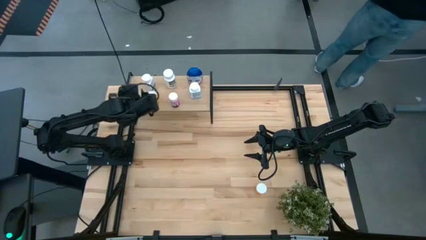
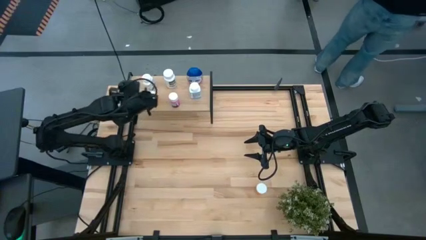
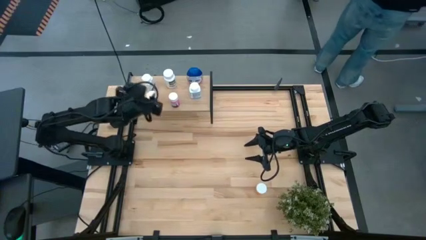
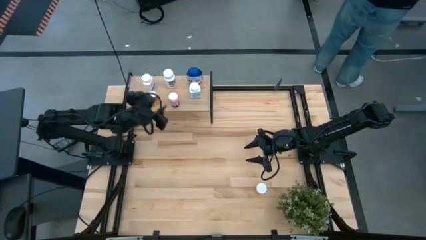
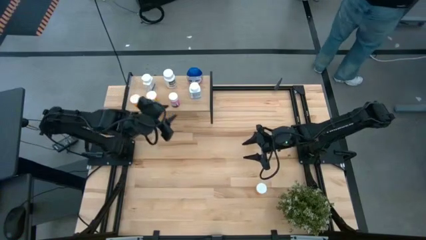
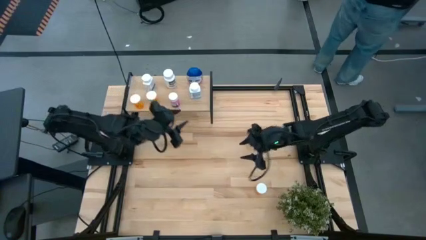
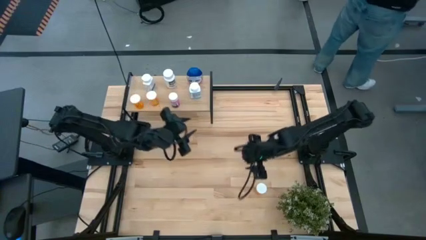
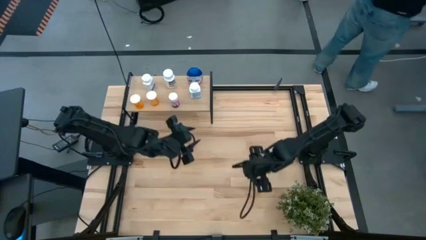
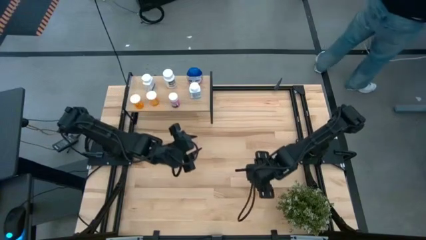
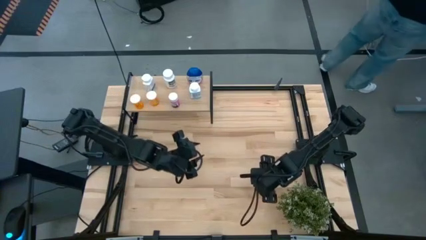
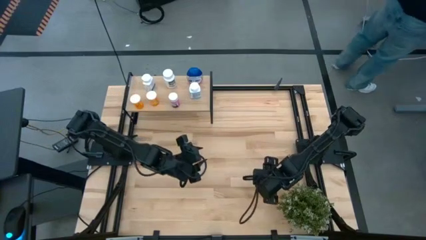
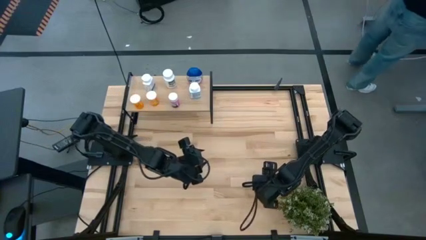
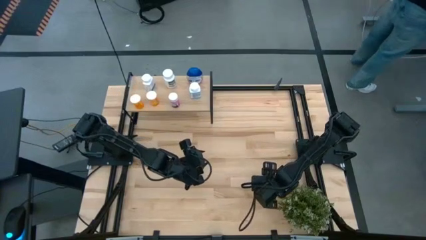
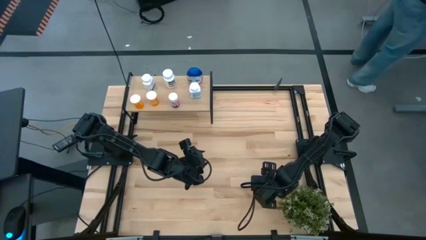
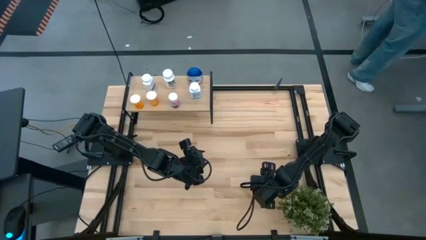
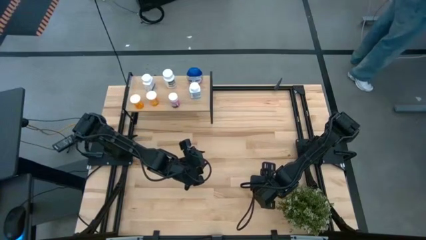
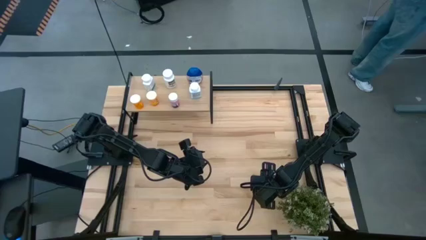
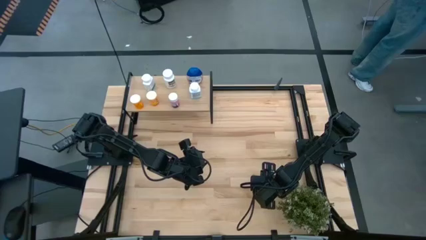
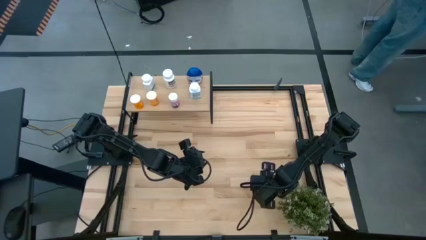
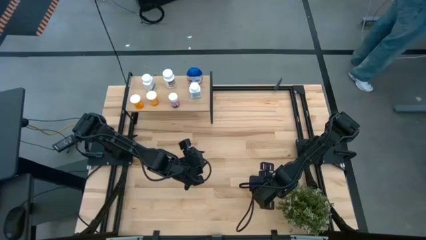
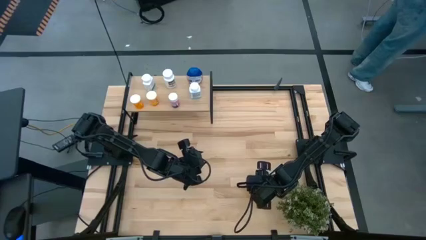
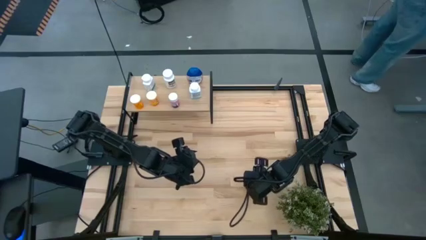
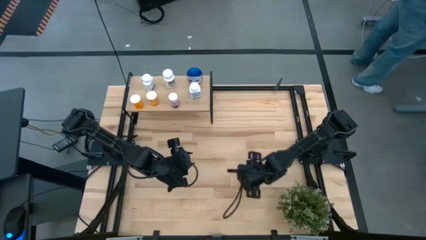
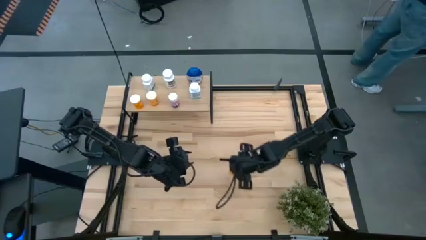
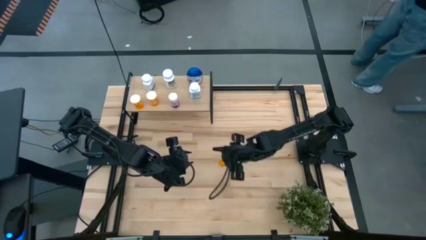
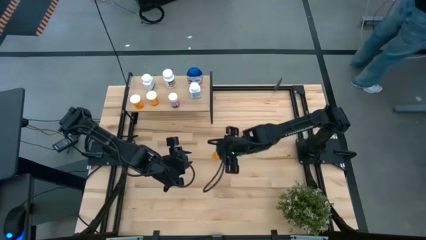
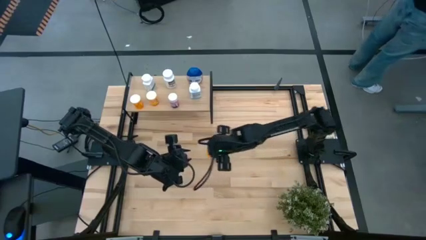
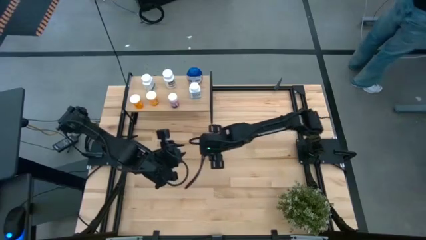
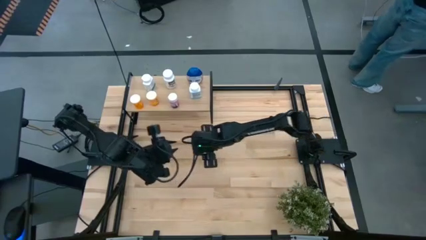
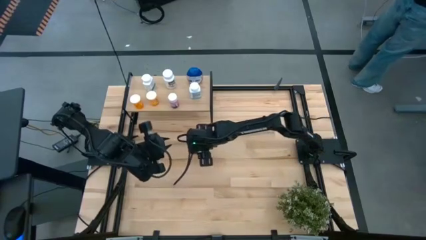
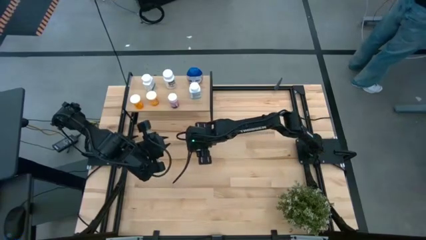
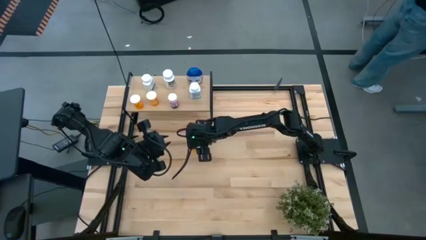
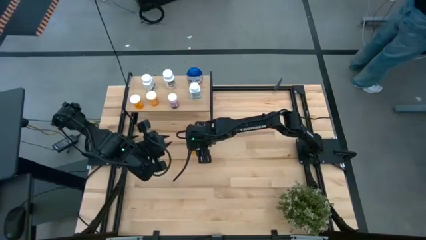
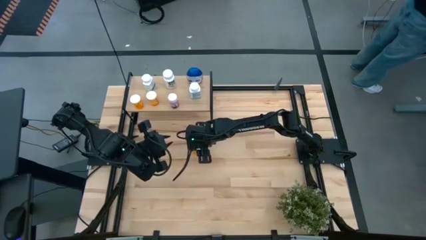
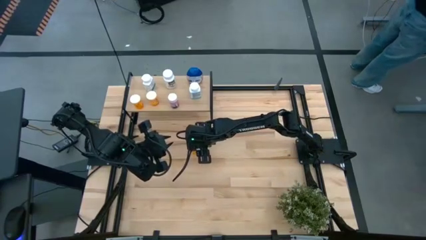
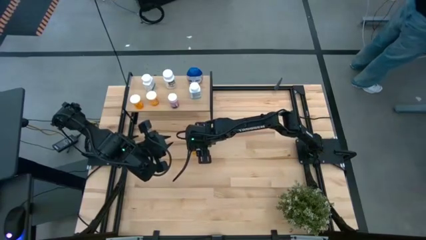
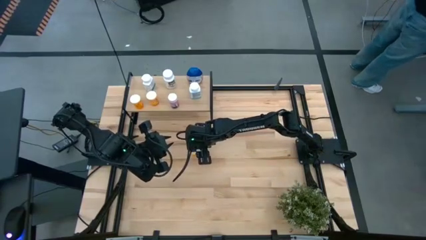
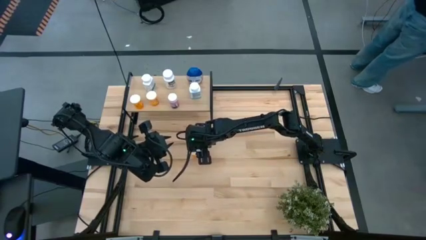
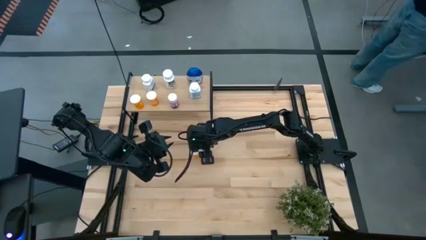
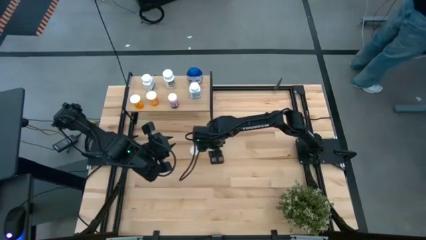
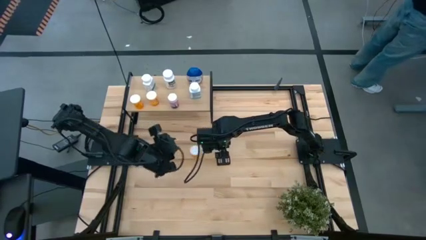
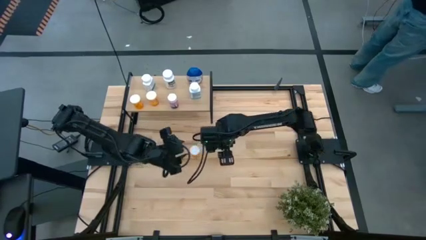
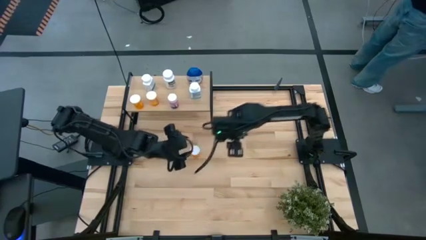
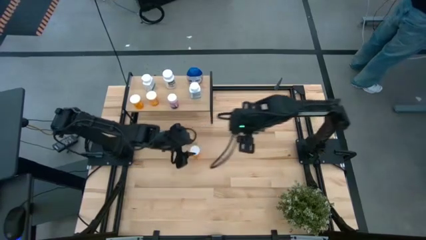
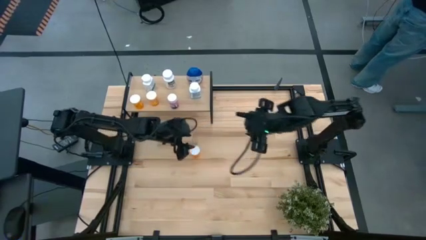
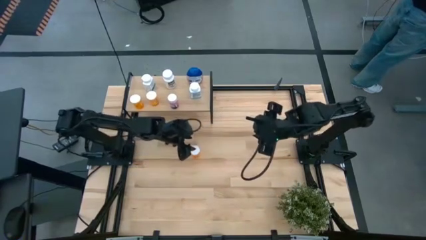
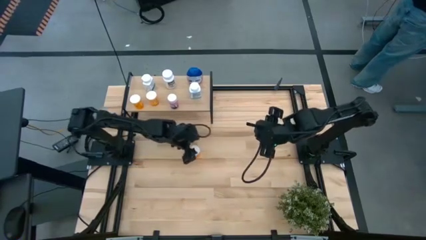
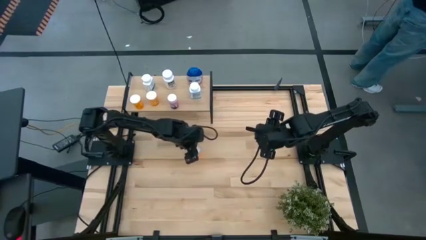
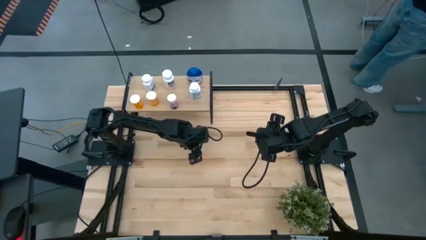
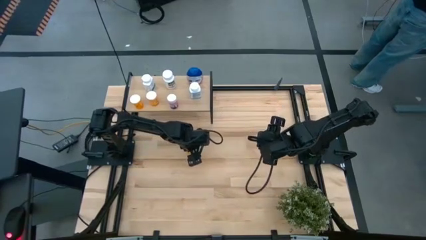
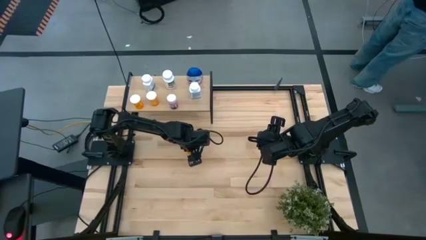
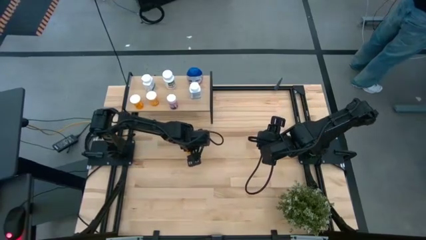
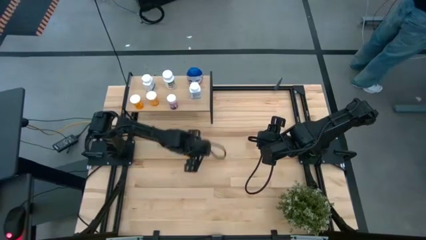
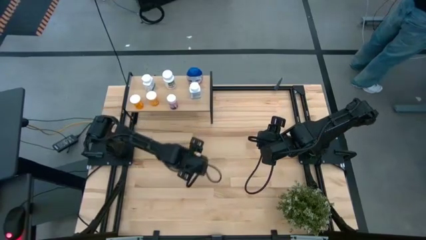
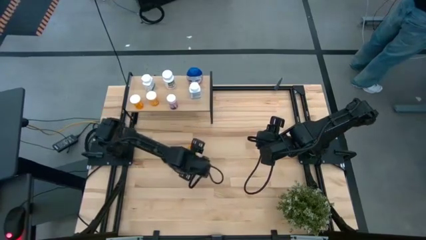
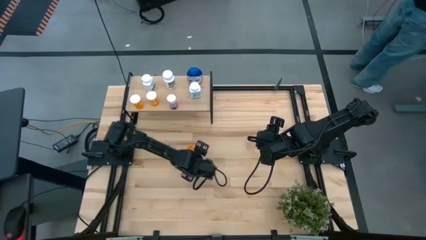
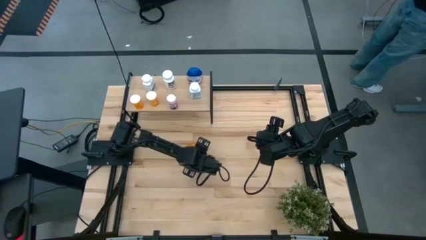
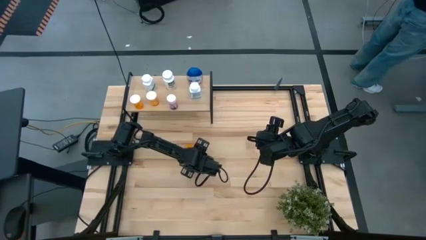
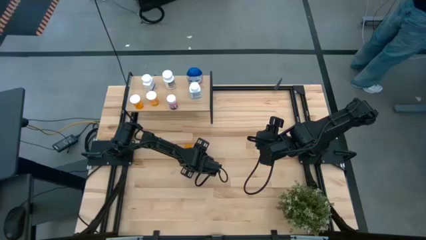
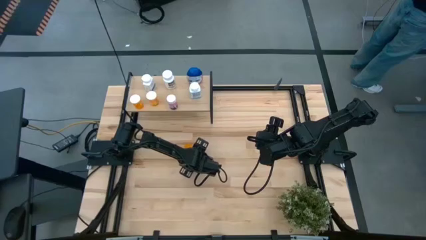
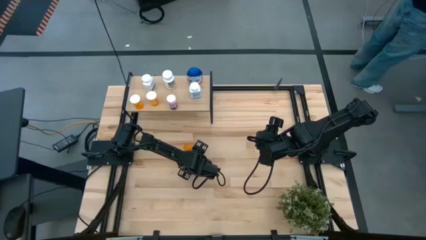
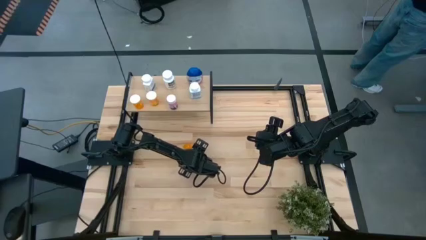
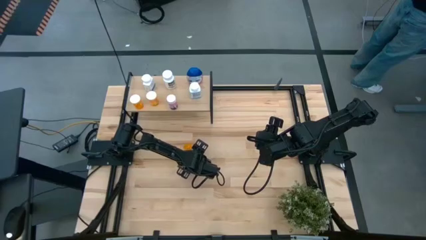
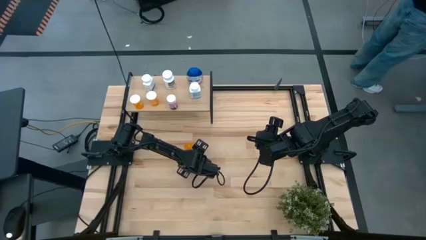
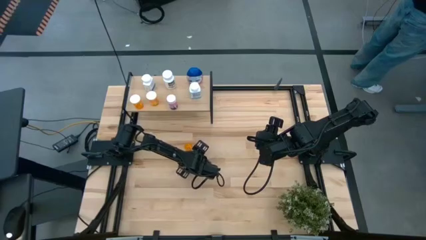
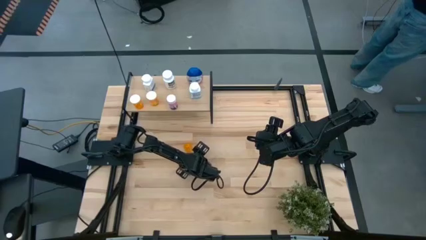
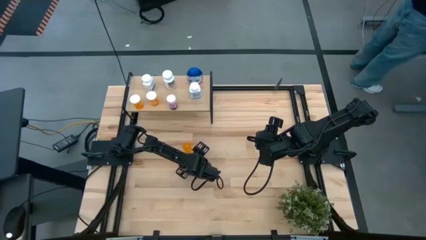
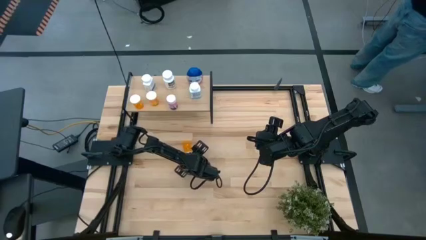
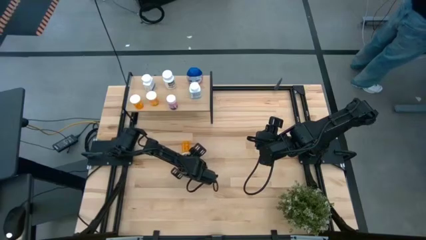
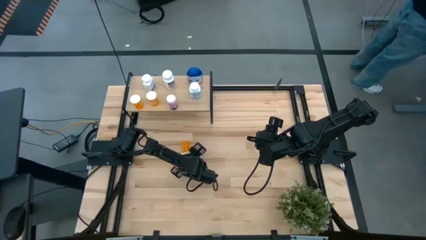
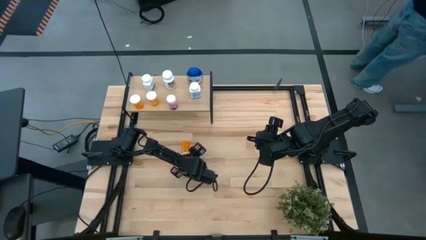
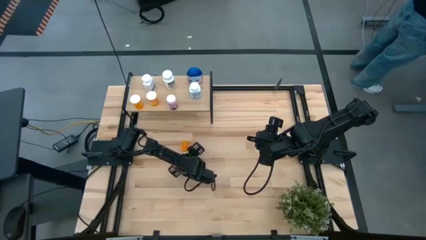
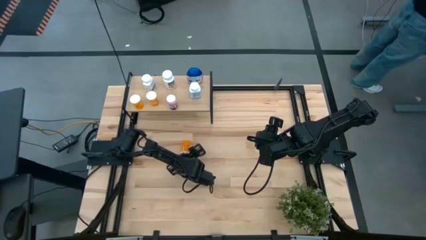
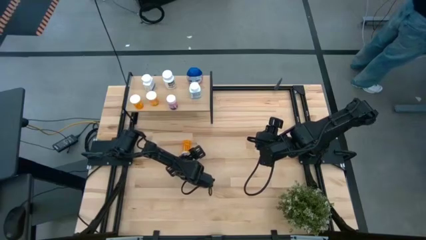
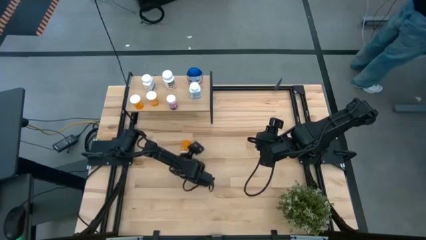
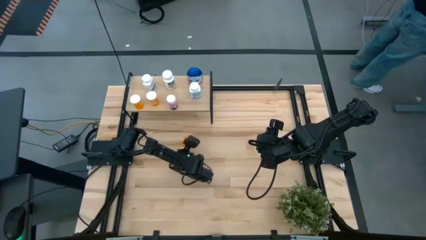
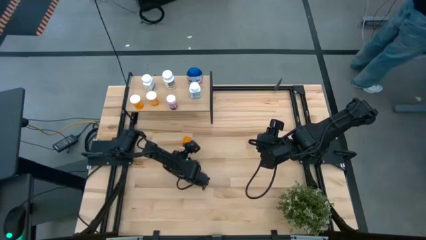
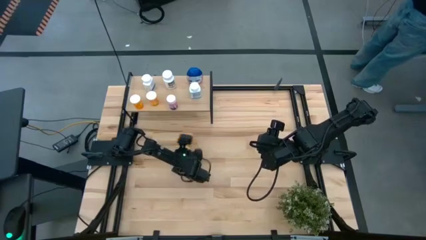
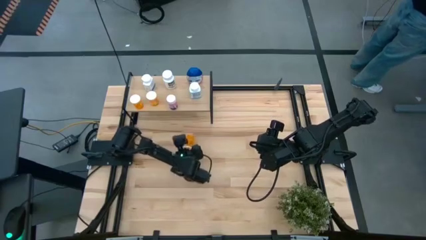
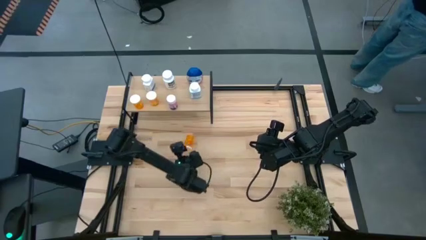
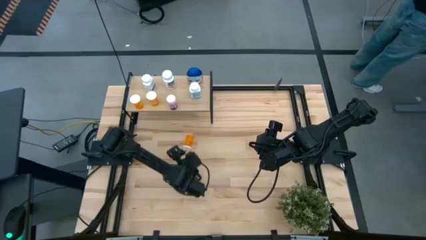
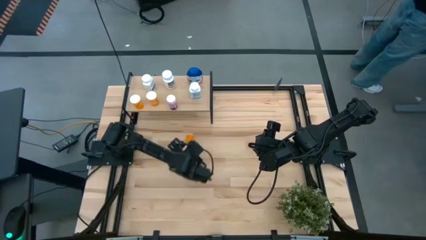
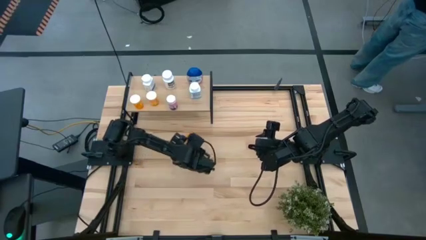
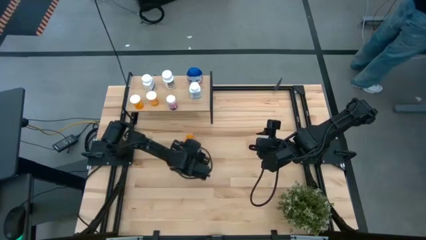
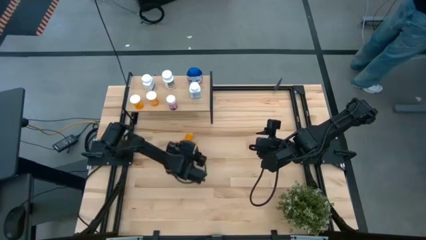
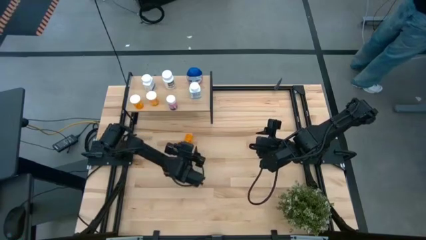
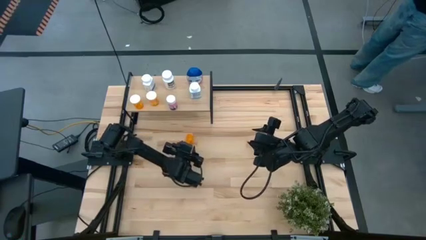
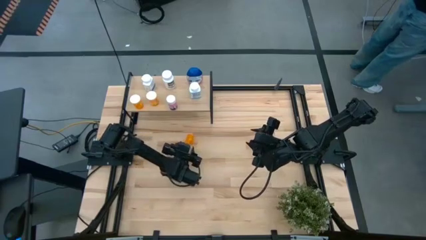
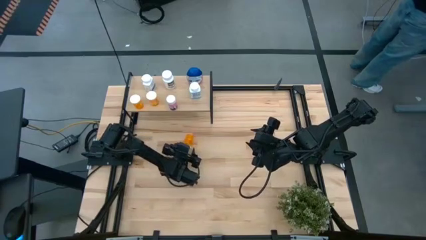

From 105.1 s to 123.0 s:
Task: Pick and place medicine bottles onto shelf by color
Put the orange pill bottle on the shelf
